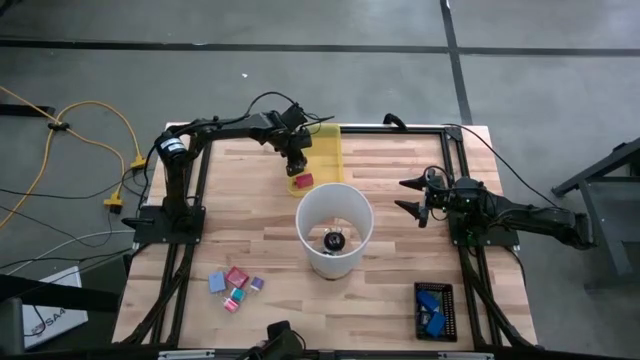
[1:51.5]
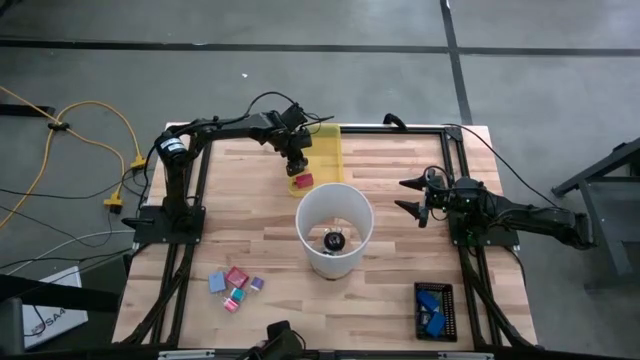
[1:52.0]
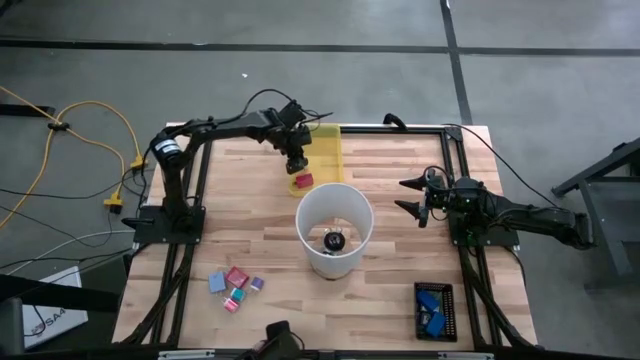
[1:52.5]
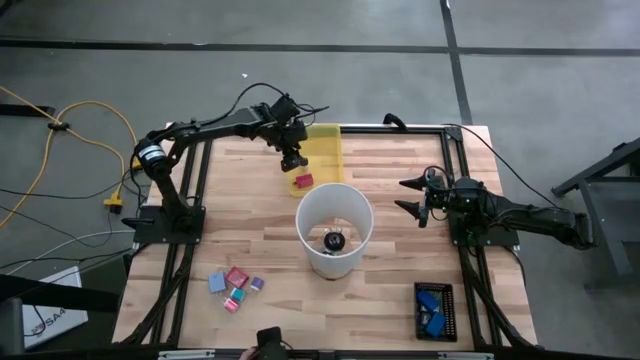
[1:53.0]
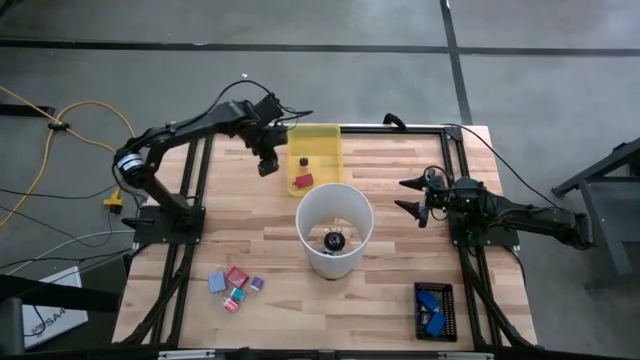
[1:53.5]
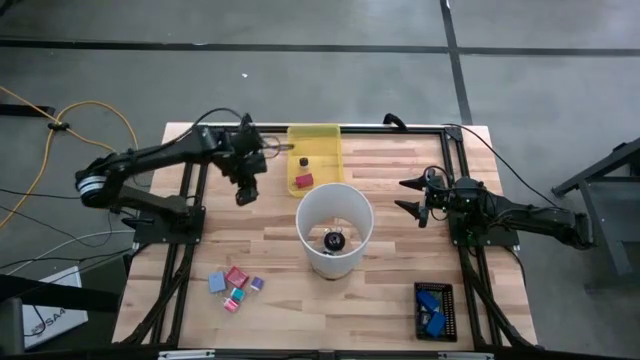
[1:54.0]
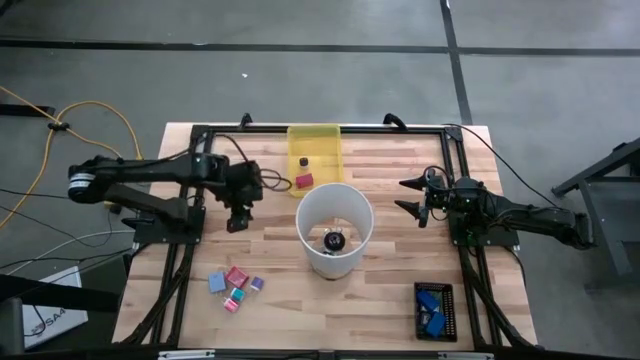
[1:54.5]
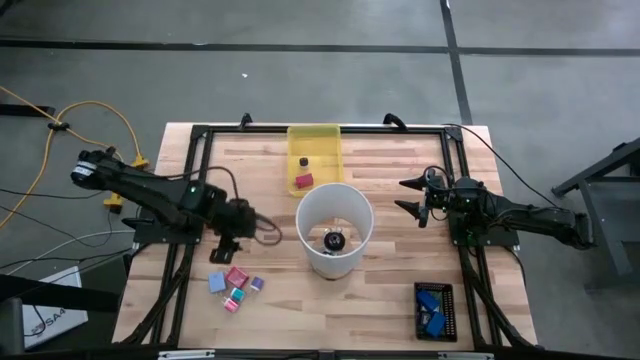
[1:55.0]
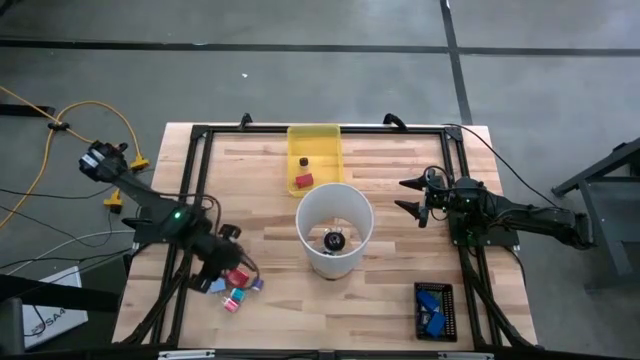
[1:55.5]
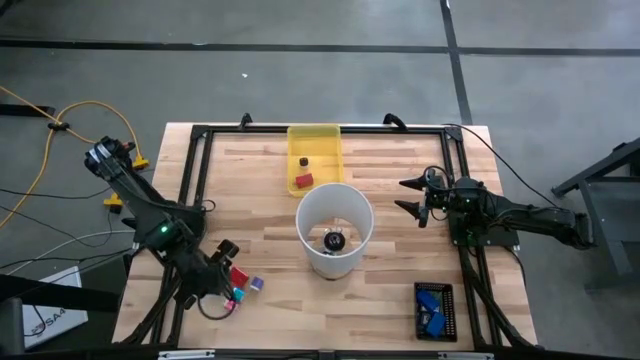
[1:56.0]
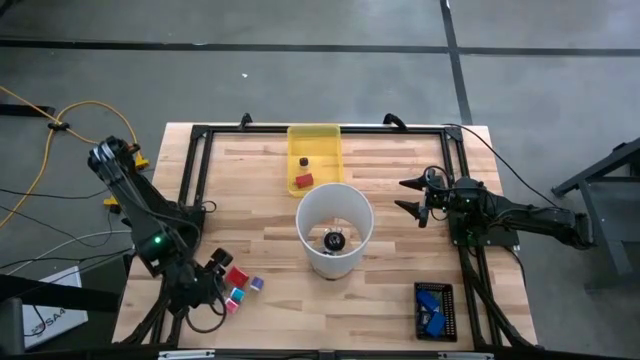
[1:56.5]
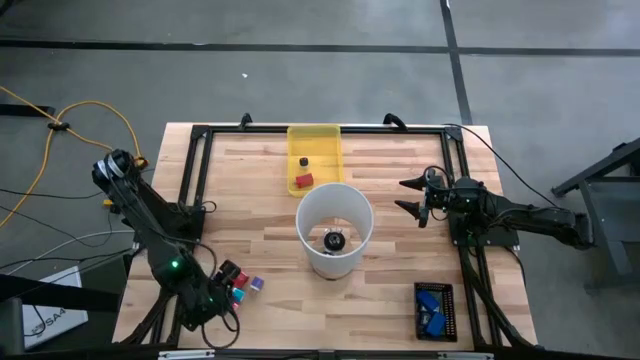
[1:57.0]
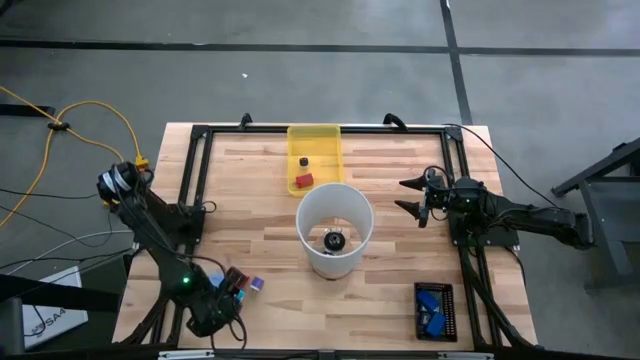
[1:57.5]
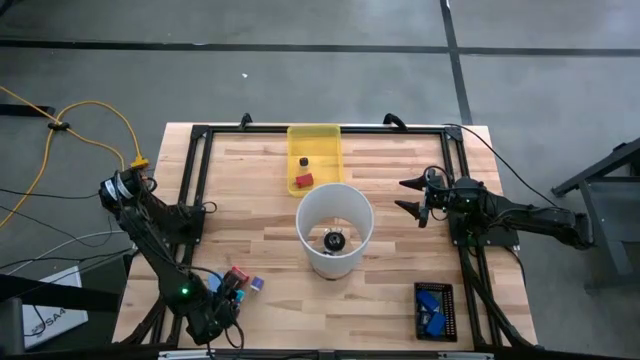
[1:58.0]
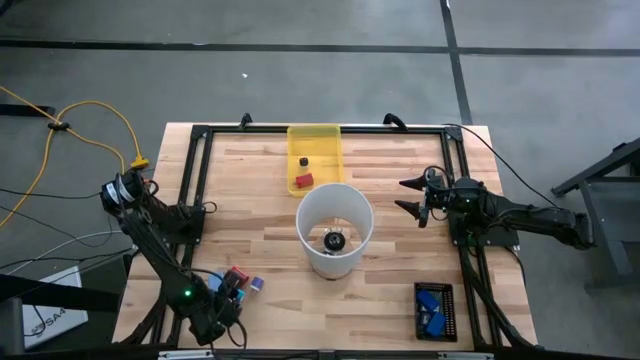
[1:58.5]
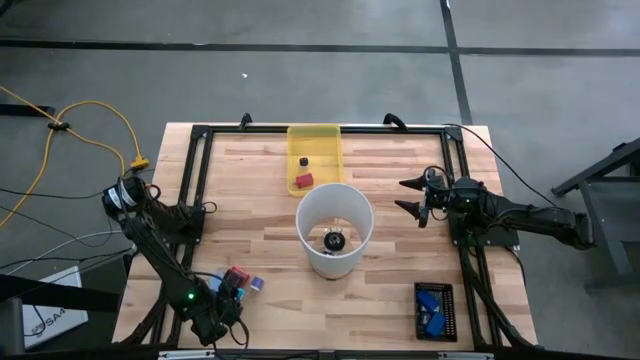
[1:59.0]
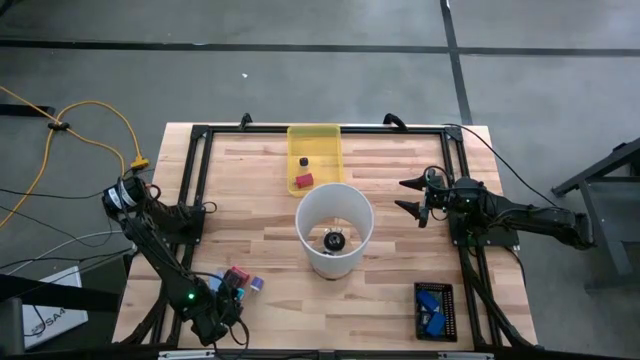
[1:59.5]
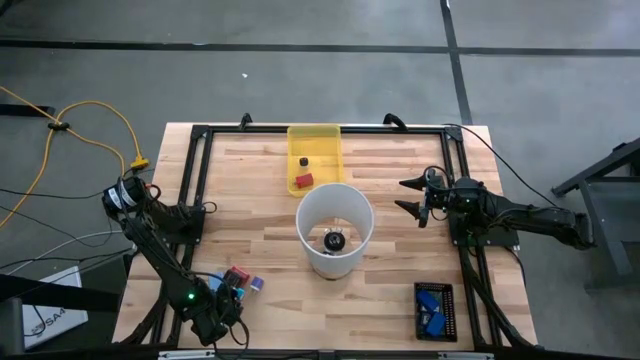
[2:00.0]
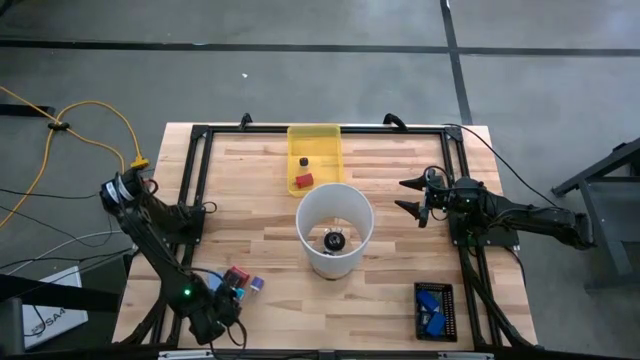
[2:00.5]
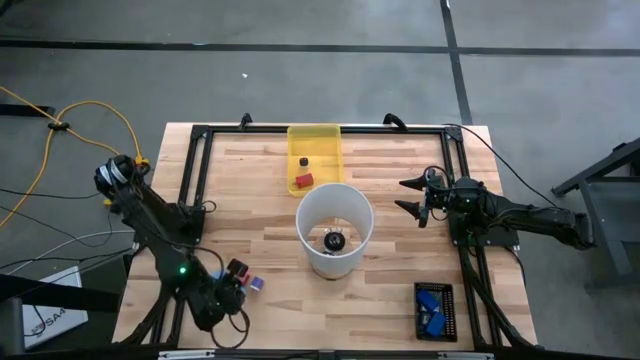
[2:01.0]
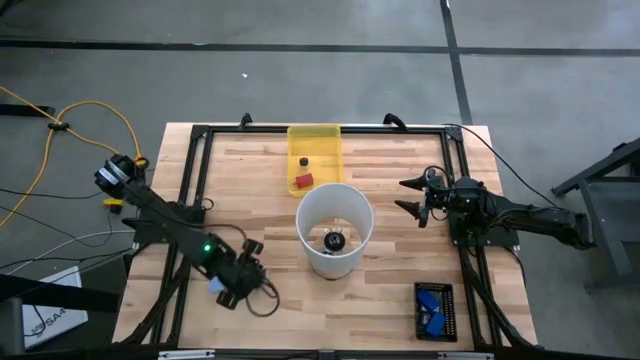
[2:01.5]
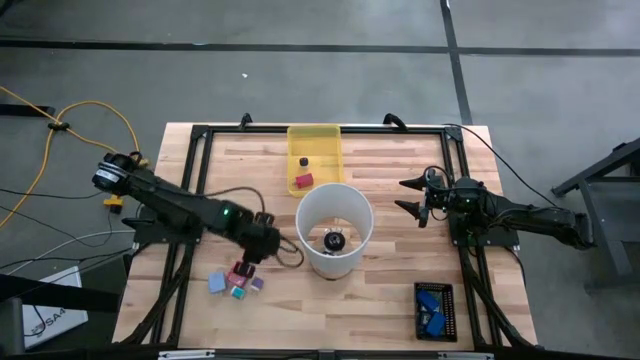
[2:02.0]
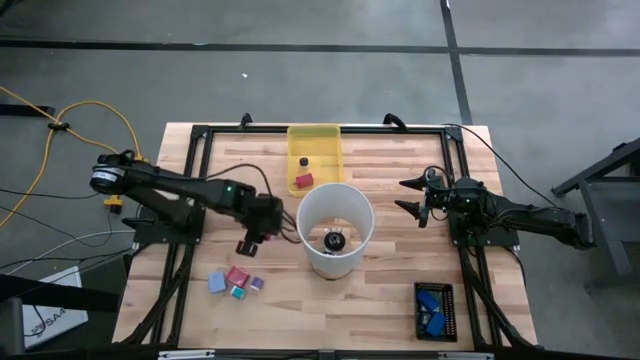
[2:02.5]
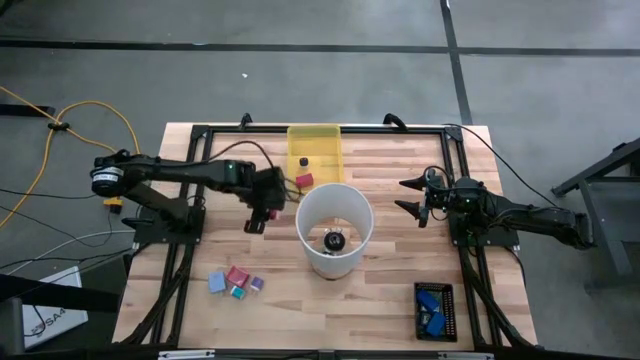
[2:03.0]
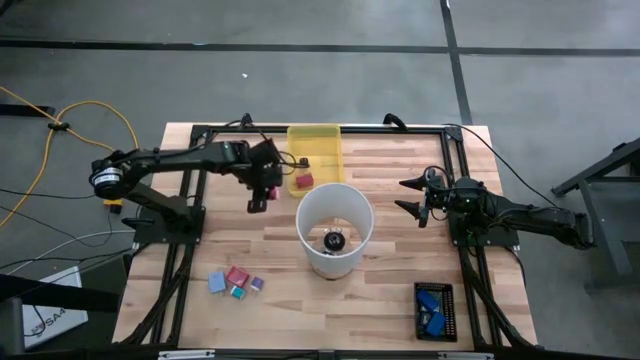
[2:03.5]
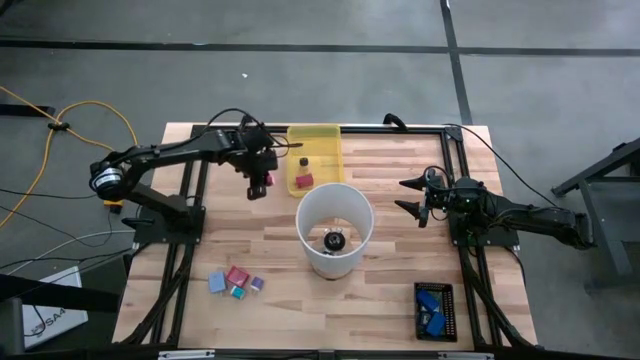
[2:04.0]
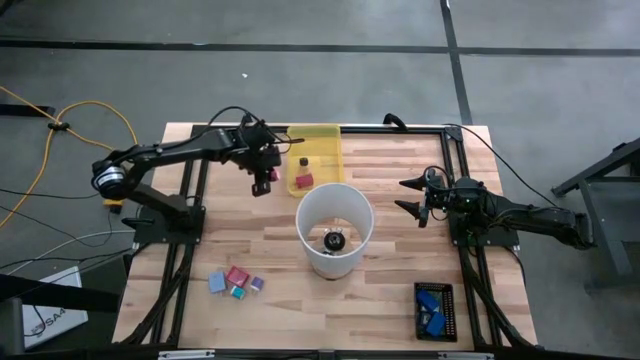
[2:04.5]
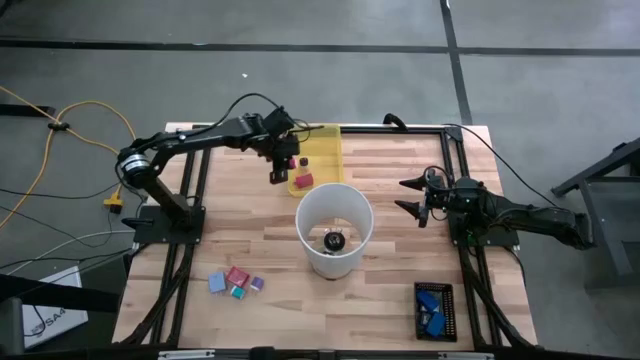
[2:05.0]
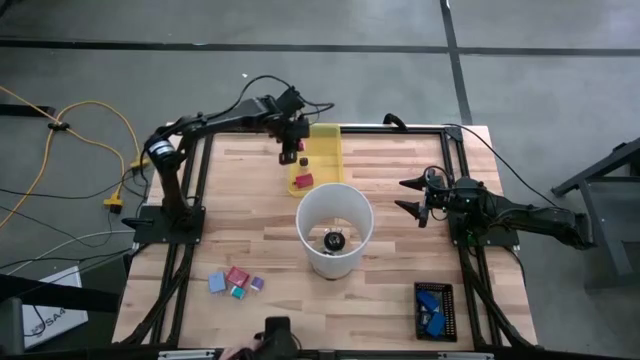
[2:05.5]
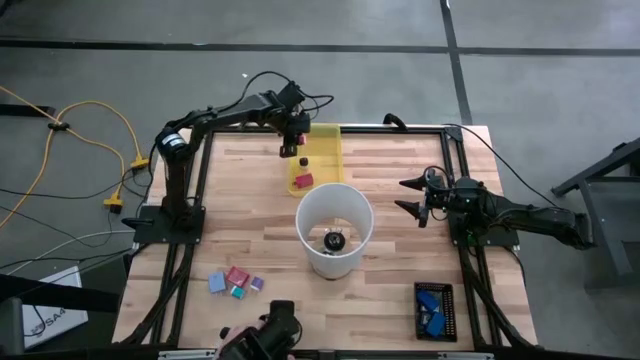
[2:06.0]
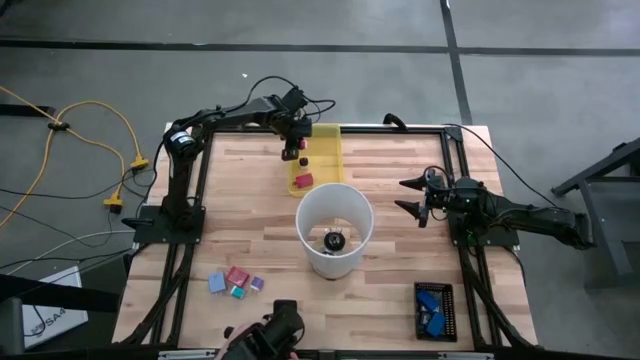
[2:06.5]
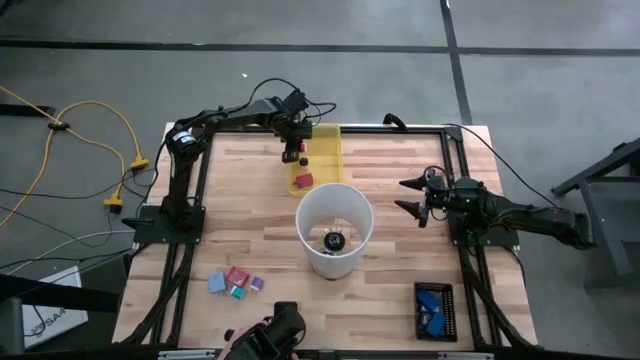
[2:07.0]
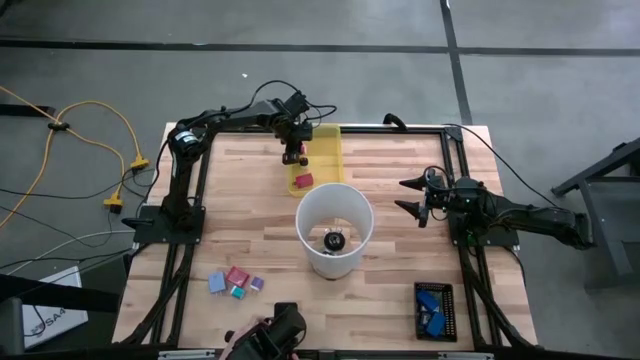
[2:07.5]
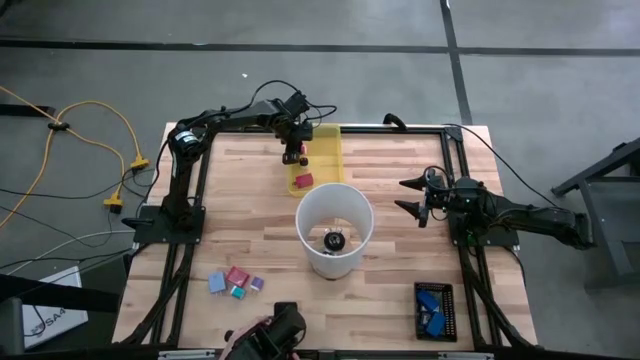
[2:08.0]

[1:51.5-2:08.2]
Task: Pick & Place Office items
Put the pink charger adapter into the yellow bin
